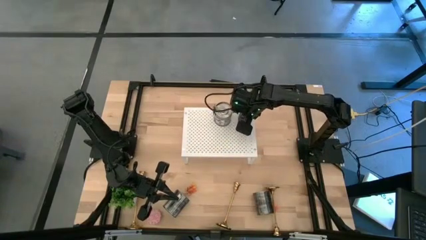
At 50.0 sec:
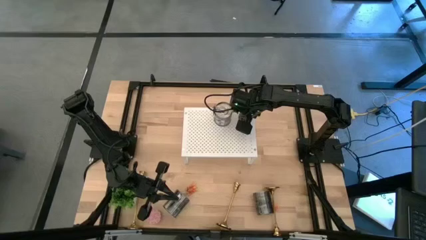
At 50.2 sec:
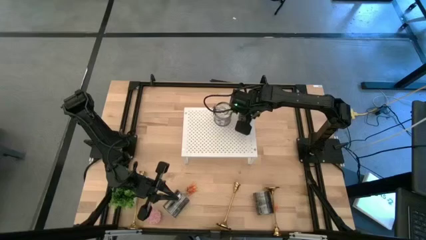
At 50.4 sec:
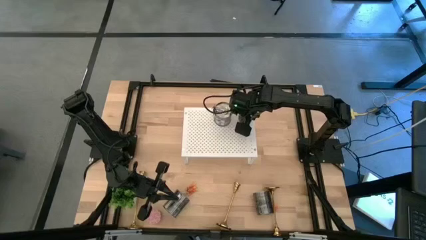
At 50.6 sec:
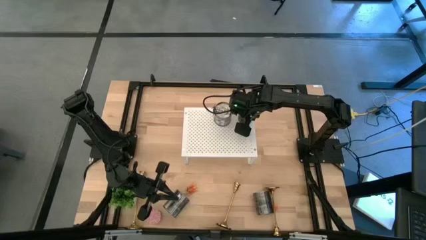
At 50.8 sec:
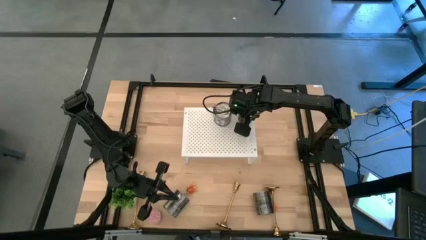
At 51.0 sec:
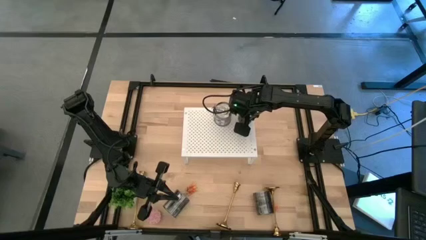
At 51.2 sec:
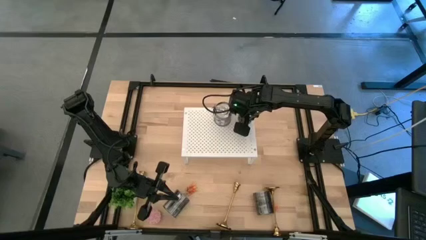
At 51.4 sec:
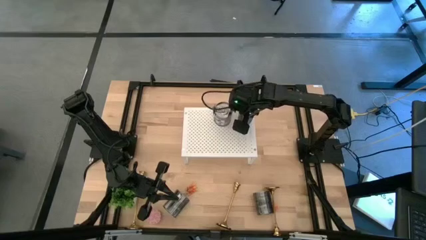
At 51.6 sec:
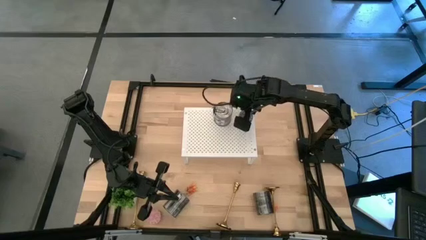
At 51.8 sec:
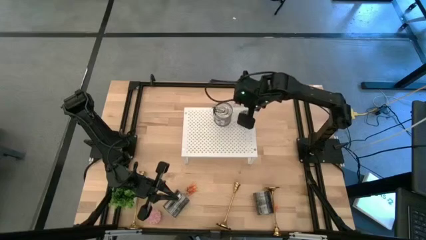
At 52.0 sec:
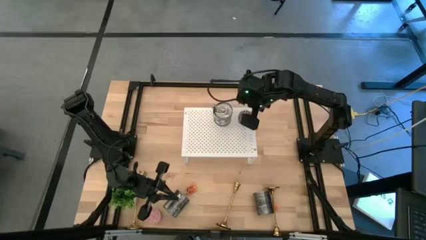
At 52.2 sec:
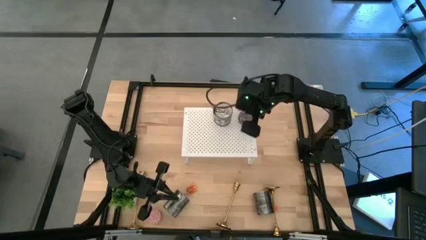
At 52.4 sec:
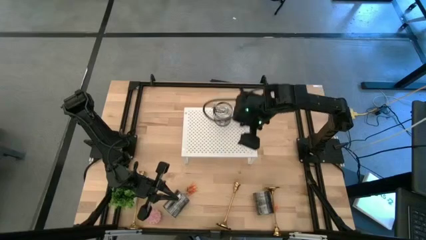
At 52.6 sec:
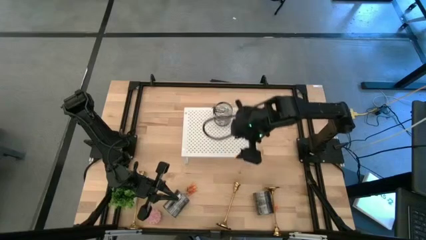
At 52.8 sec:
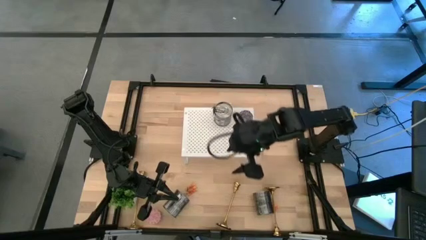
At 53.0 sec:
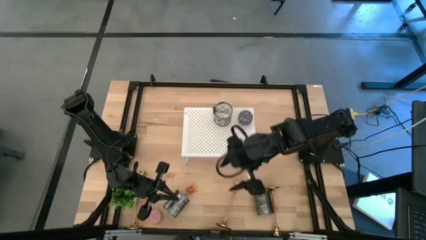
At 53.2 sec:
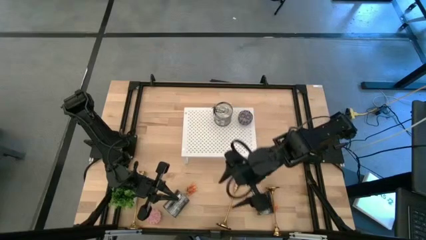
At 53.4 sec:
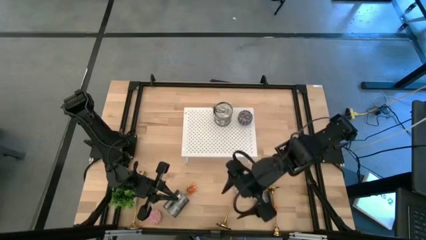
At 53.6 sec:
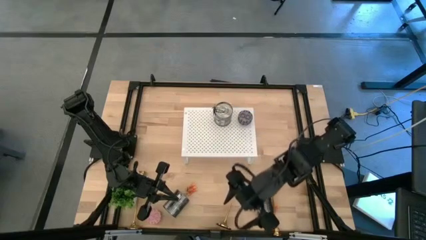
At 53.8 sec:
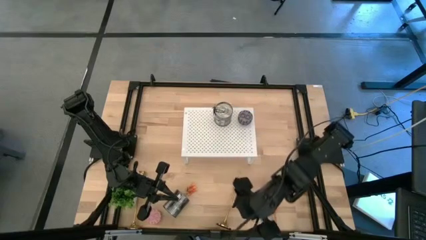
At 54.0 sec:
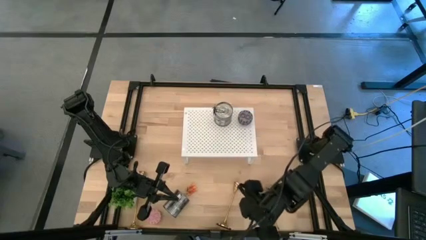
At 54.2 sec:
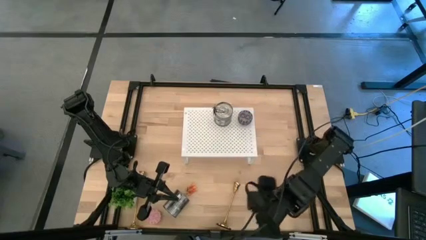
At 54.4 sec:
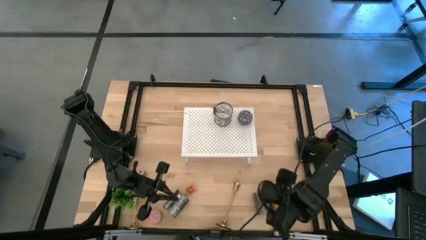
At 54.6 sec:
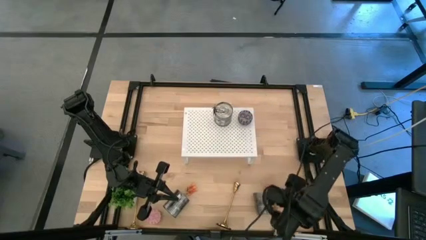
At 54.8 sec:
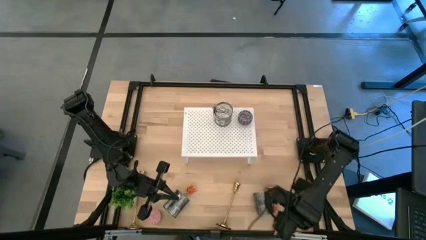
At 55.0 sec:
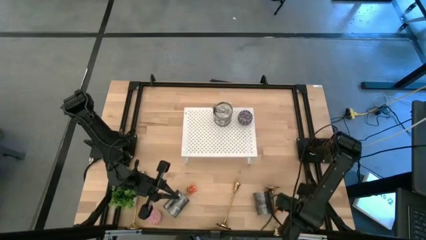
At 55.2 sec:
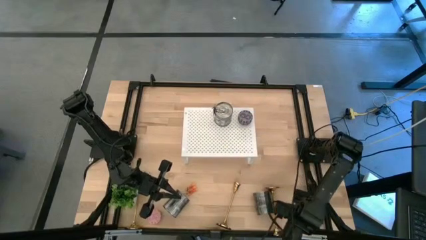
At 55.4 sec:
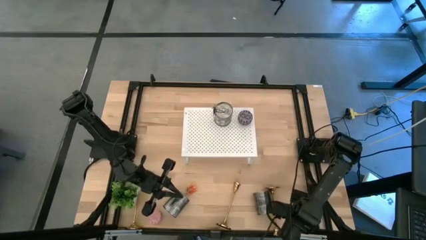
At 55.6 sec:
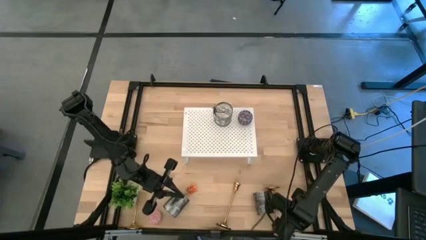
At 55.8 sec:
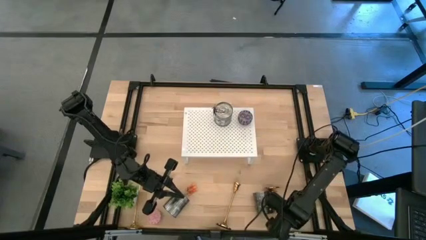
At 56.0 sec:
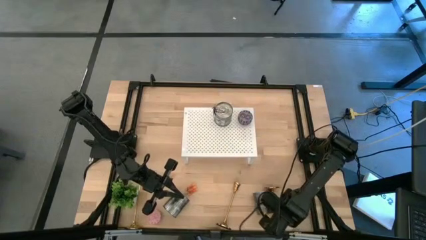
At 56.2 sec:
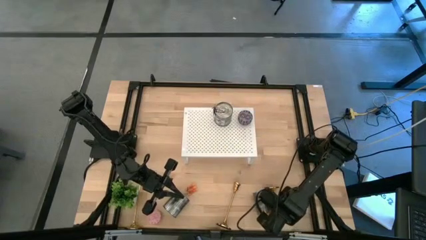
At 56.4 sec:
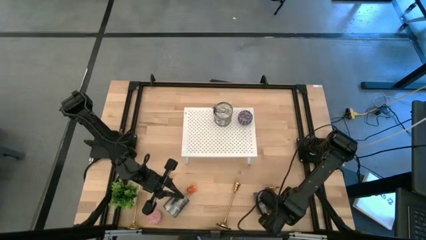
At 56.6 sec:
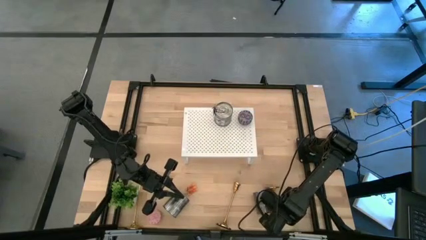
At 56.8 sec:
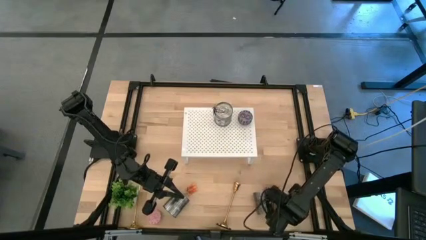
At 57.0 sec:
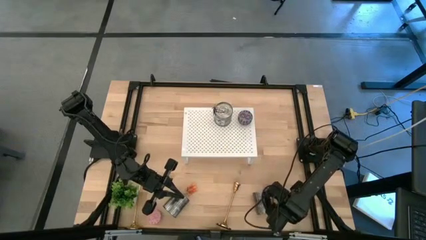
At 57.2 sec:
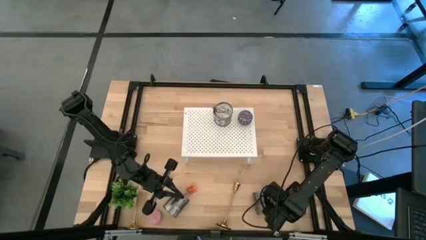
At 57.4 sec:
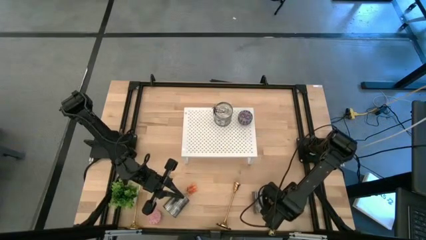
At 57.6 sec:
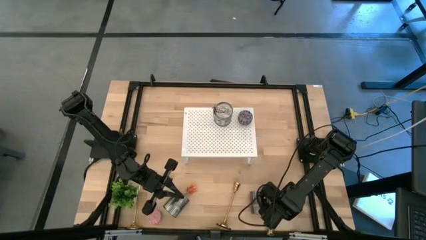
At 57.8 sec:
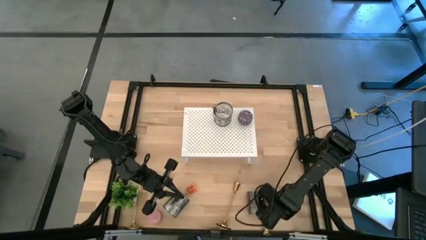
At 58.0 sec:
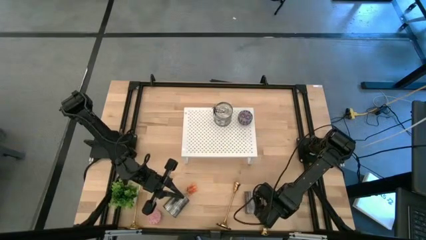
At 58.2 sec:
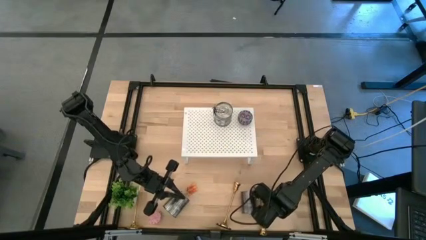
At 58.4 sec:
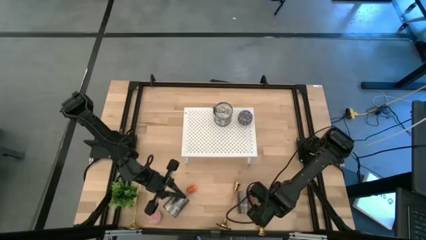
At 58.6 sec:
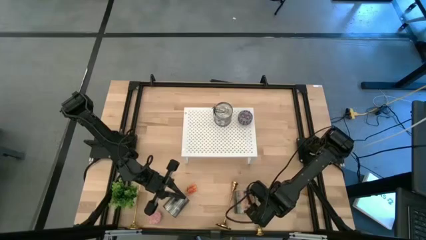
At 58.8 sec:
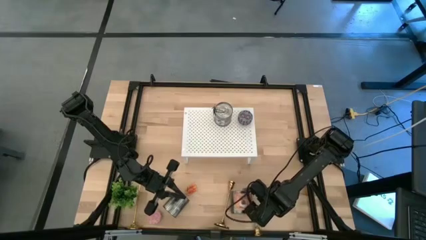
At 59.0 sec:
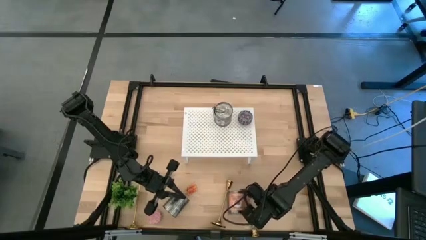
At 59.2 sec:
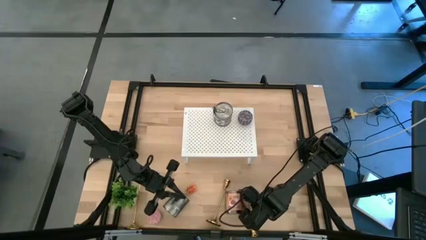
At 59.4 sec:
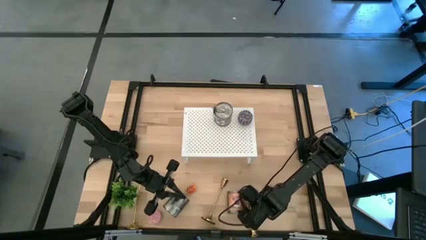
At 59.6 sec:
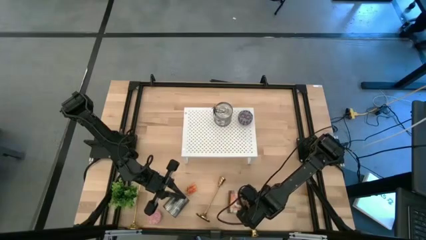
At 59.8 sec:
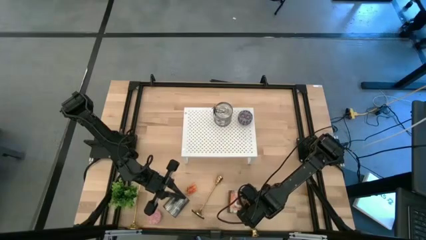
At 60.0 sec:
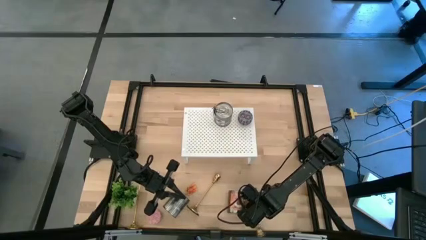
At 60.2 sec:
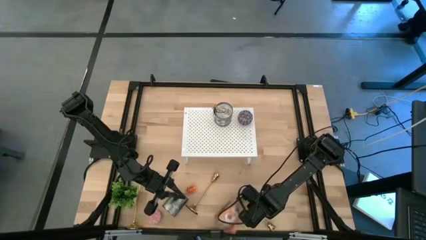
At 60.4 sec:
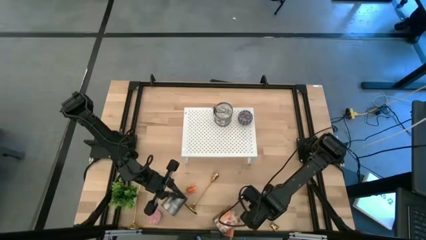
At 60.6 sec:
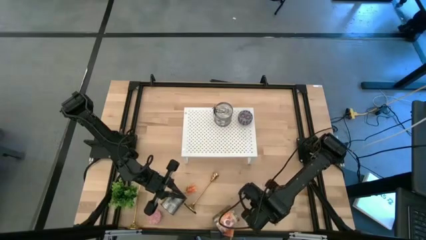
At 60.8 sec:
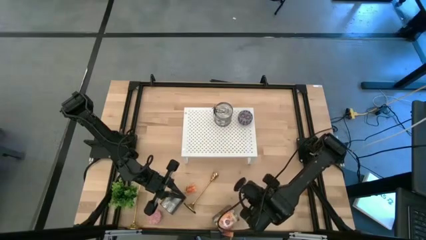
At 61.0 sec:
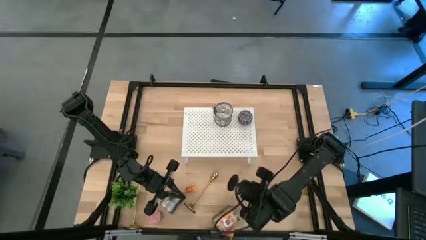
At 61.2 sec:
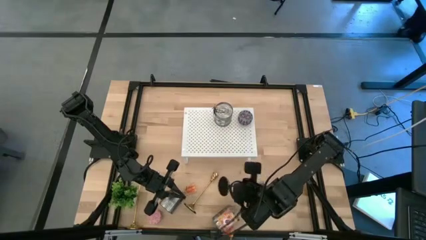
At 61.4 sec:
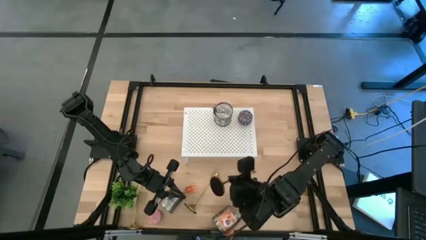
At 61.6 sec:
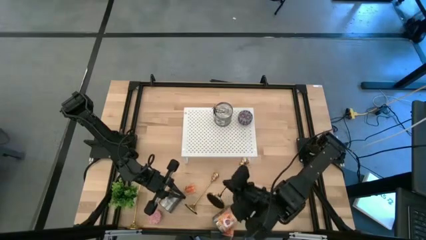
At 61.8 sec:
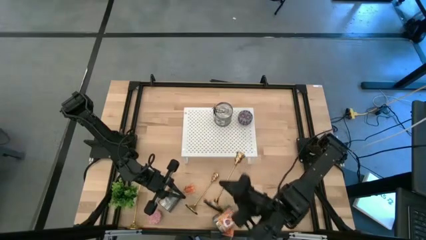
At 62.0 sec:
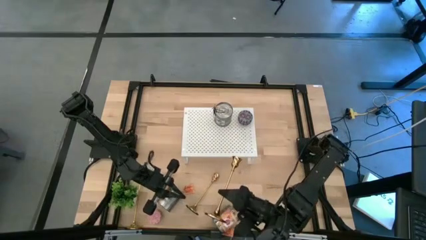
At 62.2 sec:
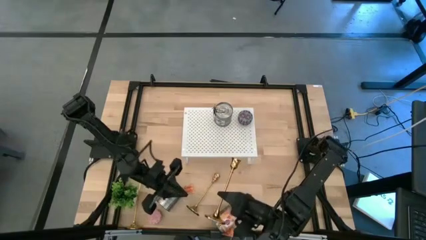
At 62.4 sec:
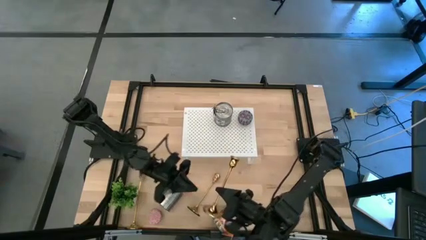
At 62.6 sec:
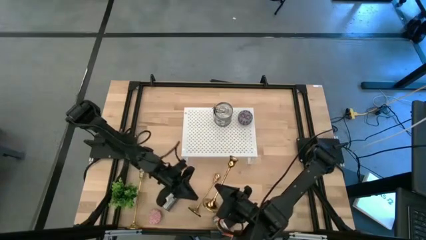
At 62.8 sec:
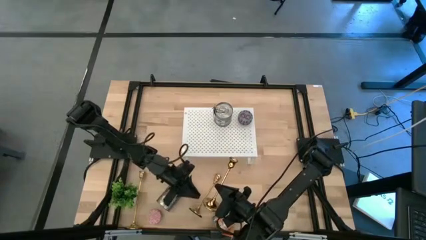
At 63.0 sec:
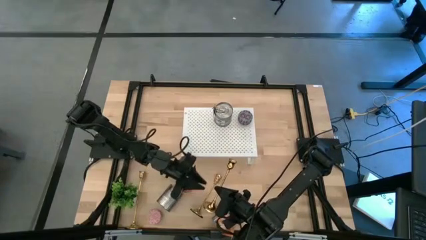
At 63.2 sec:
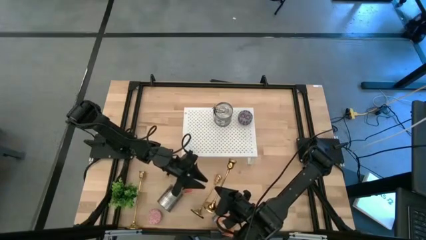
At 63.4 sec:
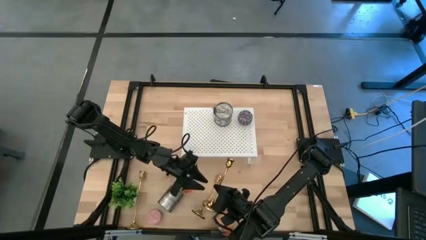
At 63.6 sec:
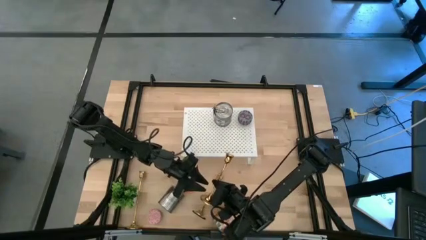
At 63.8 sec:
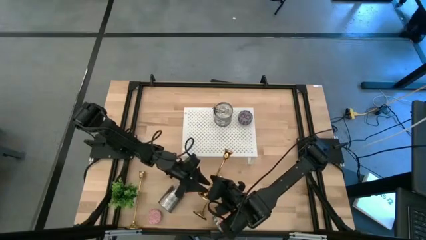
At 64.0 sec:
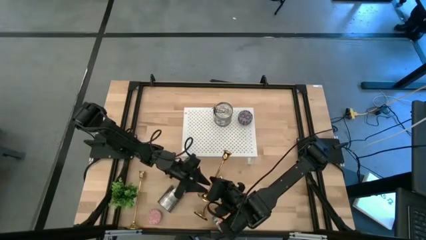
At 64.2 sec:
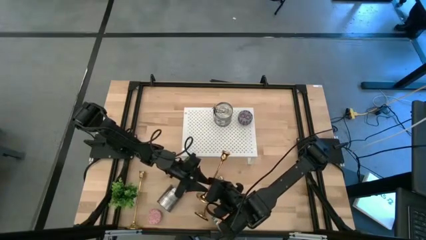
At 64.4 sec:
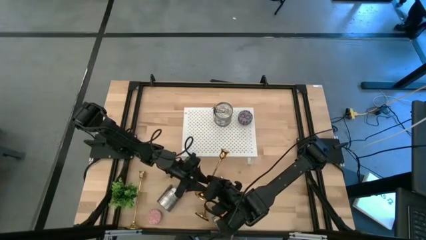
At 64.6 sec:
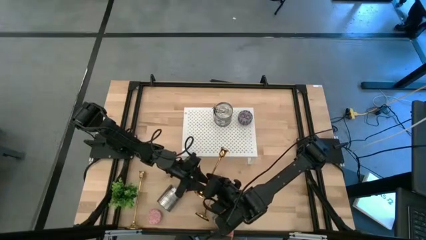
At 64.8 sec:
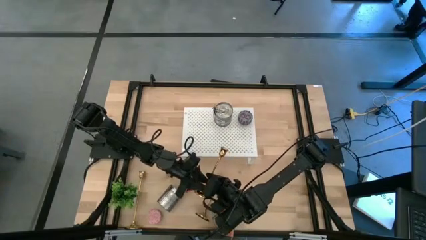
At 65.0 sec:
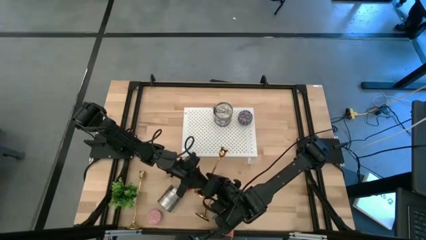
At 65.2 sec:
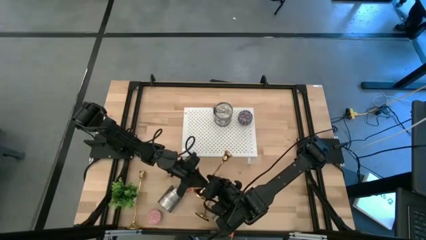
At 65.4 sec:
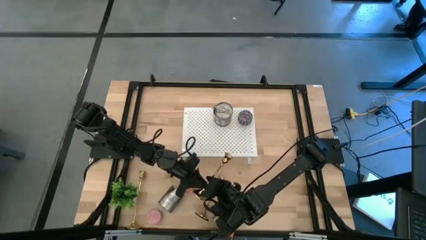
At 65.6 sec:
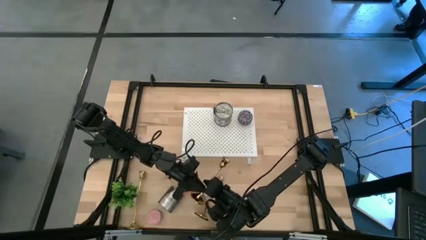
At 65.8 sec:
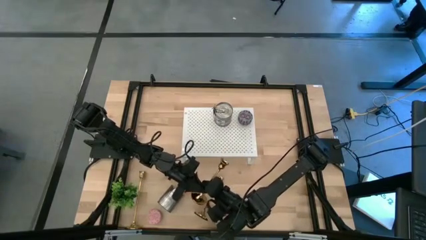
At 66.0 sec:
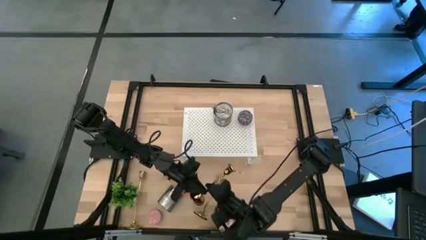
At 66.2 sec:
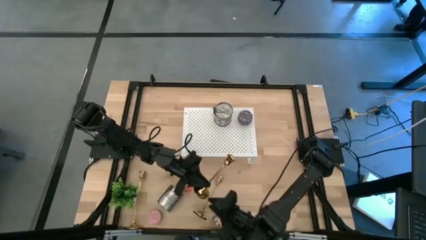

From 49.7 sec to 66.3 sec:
Task: Pick & Place candle stick holders
Put the right gold candle holder on the shelf
